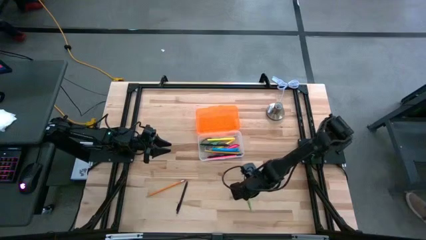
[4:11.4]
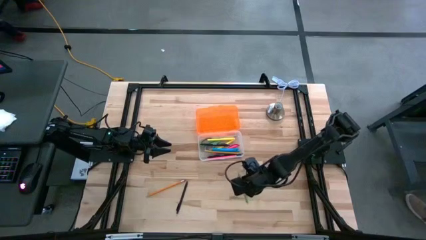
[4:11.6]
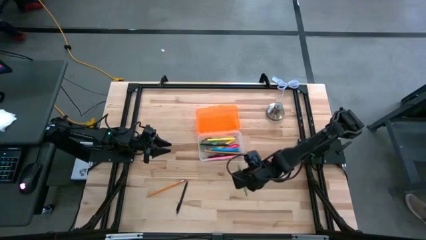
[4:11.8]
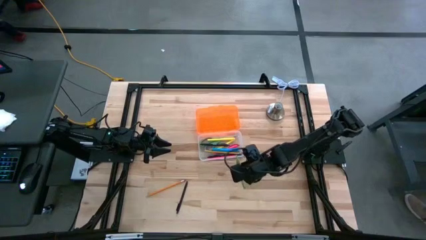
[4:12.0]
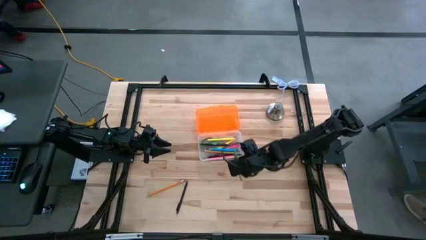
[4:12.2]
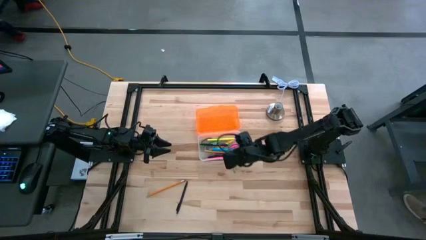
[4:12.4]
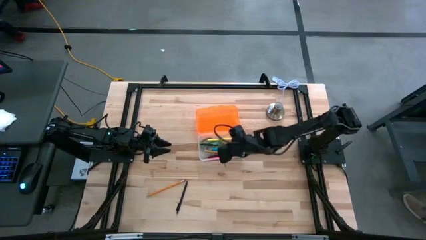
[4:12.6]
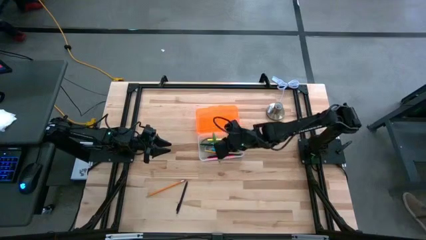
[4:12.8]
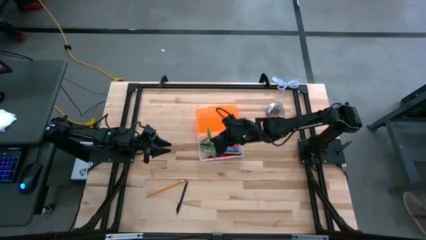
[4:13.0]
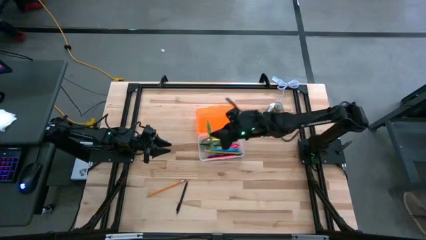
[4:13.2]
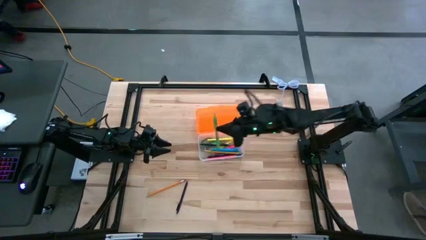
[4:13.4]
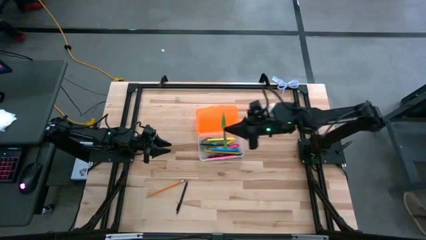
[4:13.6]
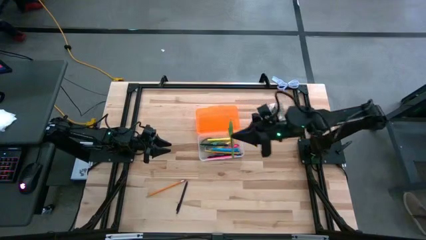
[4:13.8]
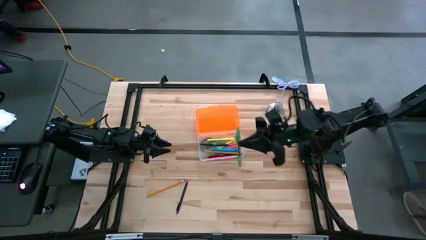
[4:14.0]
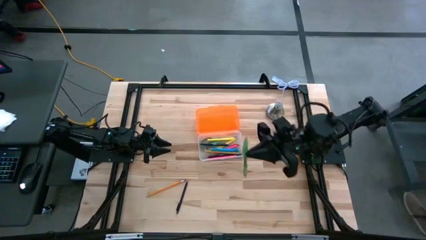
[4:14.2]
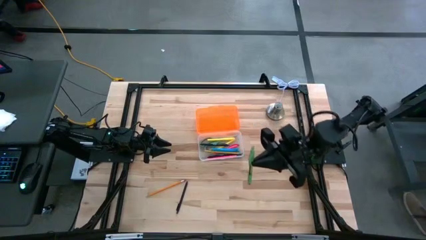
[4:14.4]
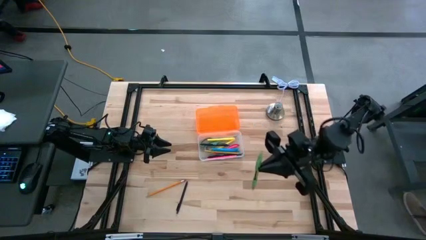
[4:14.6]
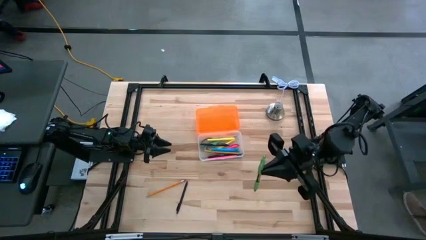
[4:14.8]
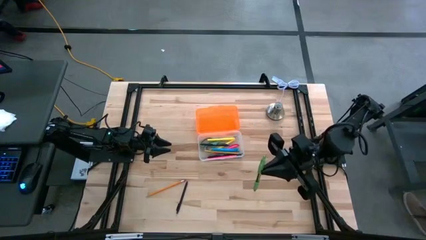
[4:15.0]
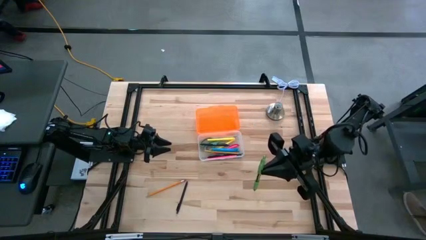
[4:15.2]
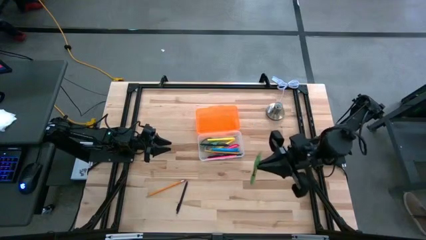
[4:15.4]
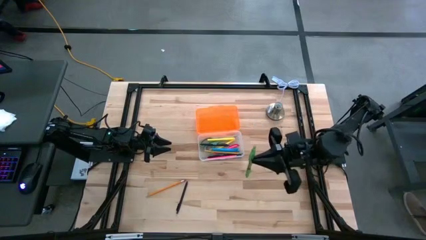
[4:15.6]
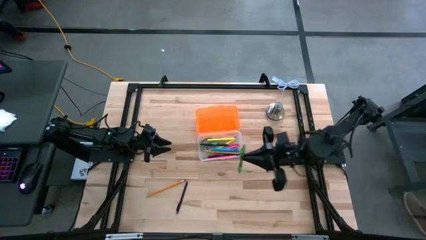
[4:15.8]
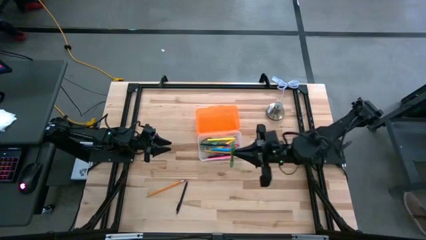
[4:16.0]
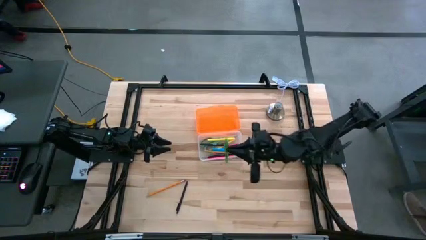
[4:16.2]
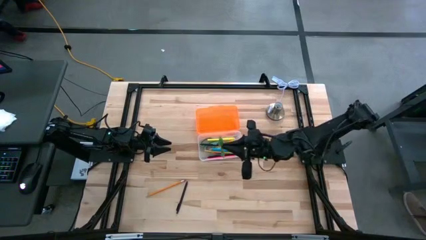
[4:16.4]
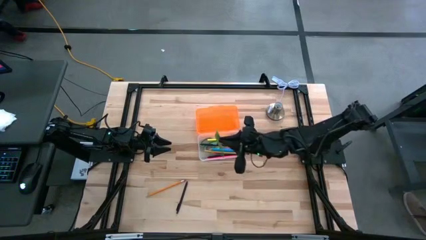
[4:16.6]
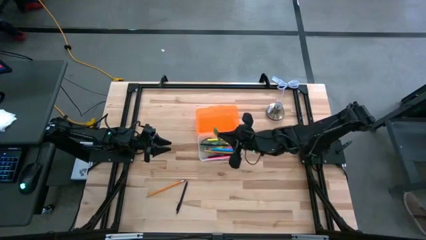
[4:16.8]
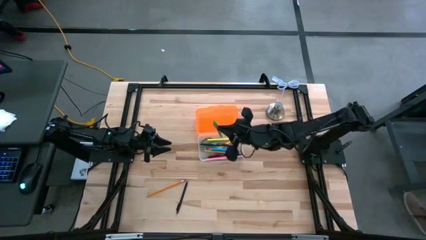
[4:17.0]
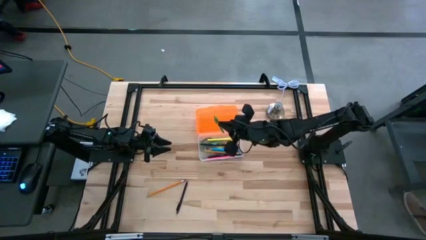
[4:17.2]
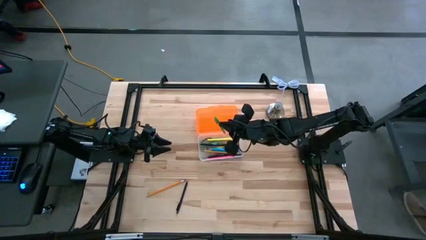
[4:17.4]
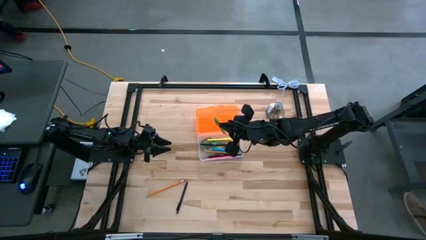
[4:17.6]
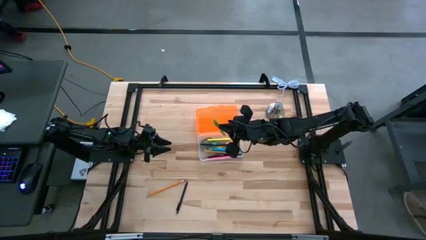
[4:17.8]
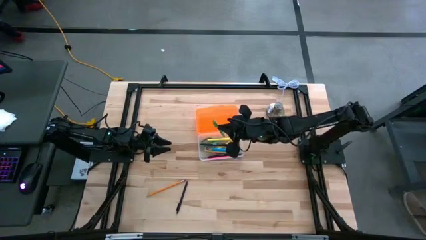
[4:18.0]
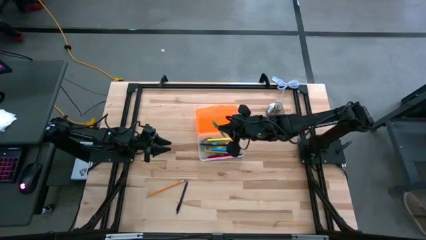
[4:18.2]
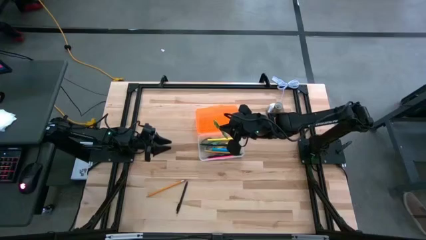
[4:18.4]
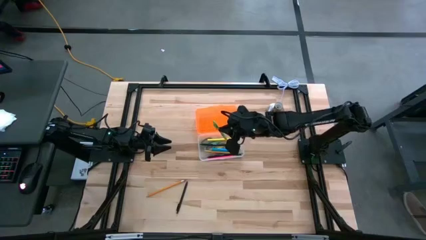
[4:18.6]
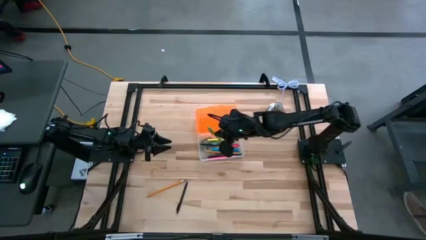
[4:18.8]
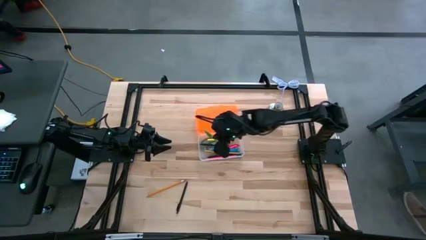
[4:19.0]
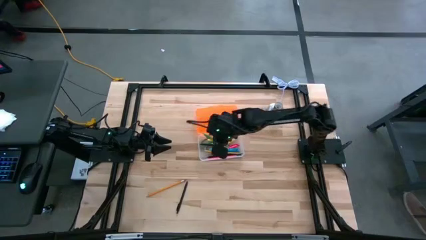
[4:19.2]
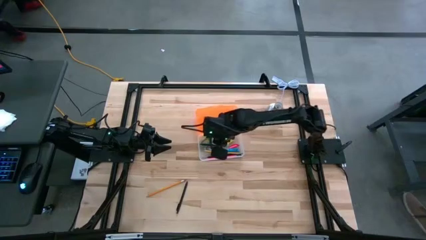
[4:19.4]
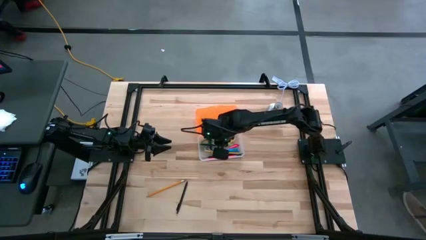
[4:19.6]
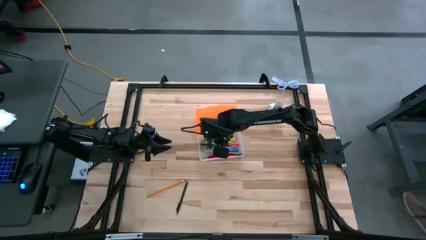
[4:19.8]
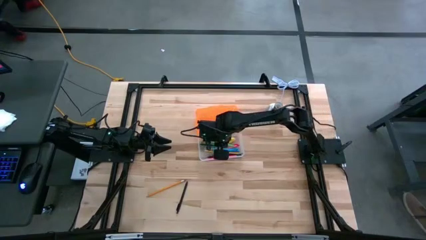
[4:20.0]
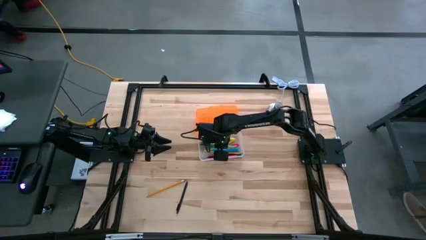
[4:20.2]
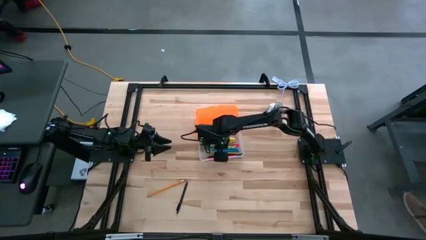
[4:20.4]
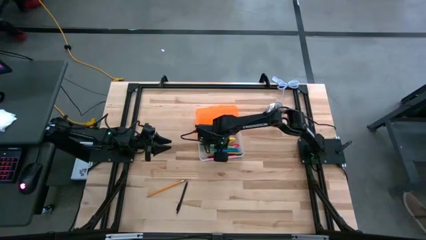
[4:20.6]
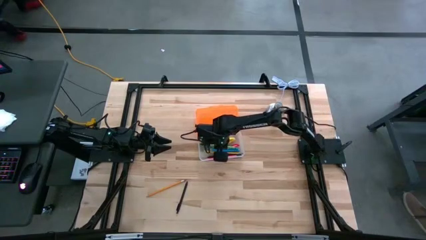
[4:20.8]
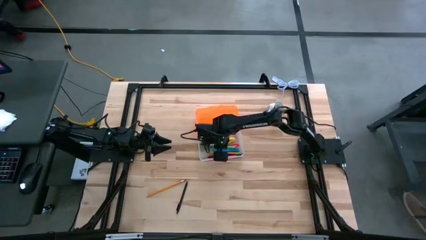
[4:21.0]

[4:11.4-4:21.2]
Task: Pick & place school supplies into a supply box
Put the green pen into the container

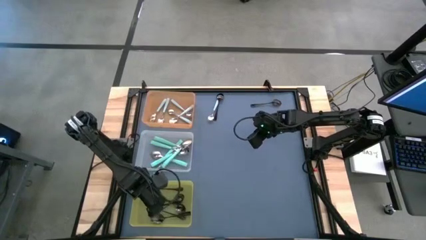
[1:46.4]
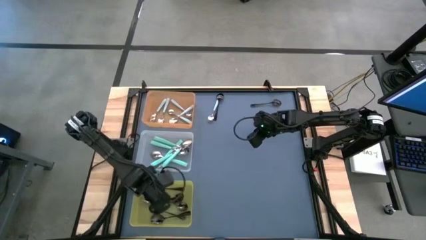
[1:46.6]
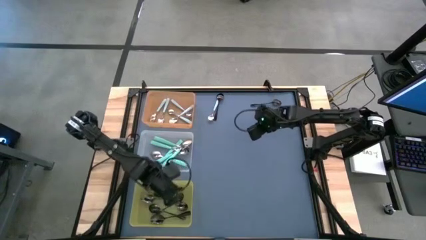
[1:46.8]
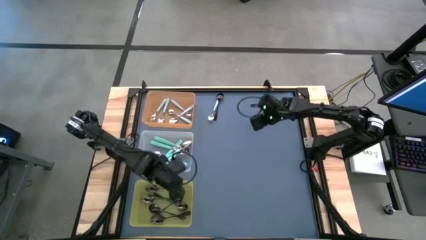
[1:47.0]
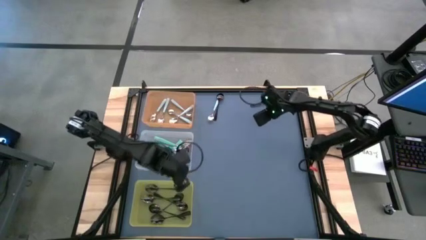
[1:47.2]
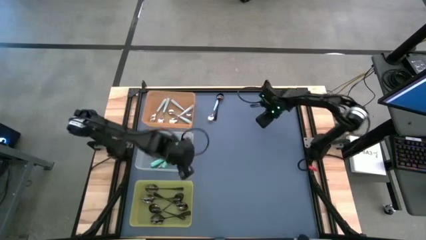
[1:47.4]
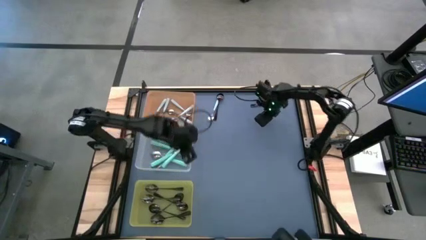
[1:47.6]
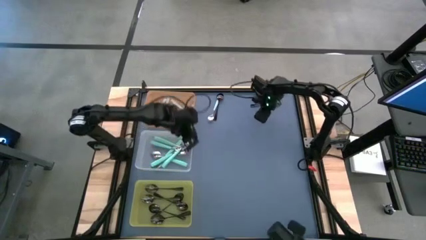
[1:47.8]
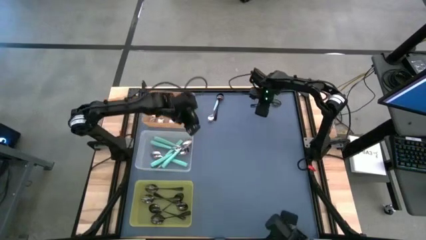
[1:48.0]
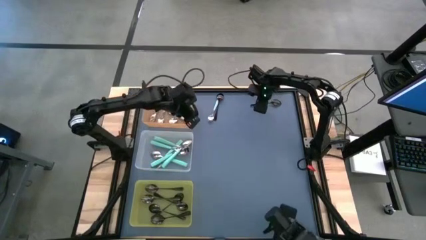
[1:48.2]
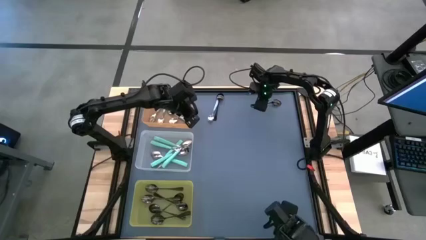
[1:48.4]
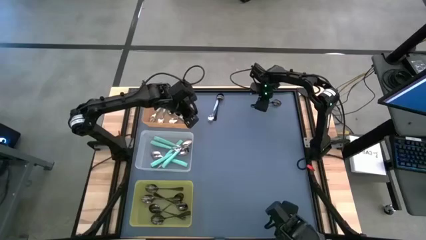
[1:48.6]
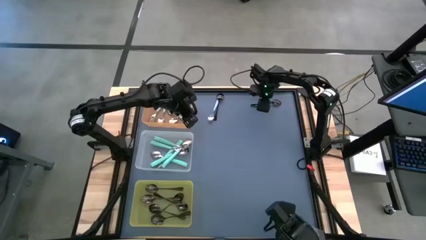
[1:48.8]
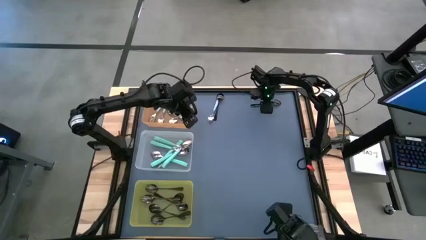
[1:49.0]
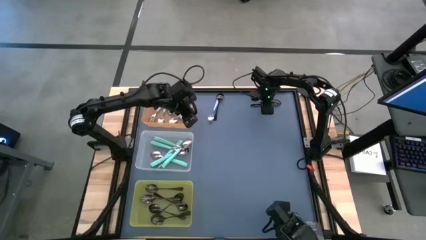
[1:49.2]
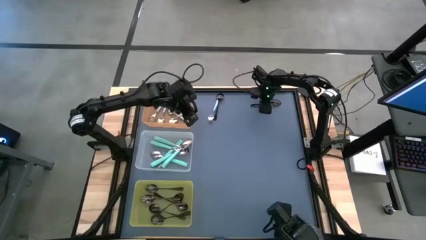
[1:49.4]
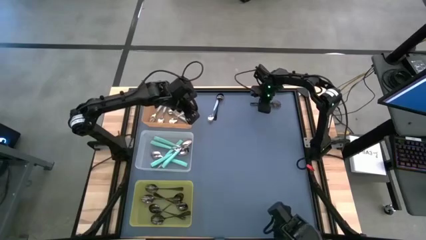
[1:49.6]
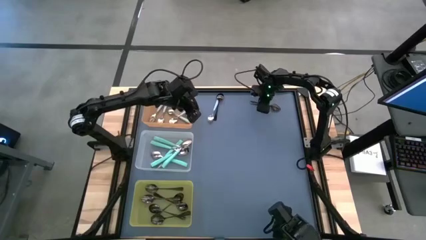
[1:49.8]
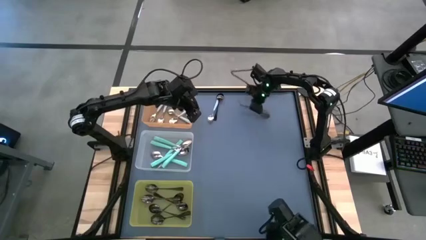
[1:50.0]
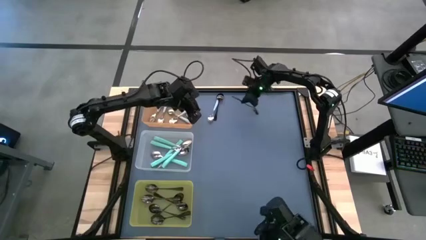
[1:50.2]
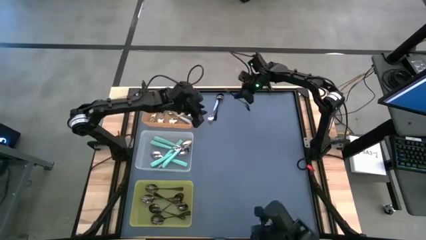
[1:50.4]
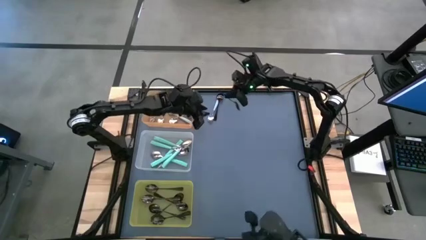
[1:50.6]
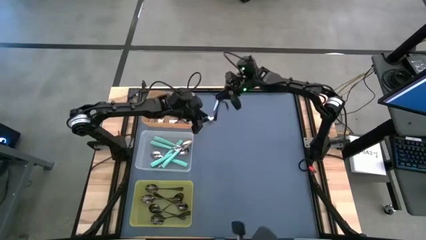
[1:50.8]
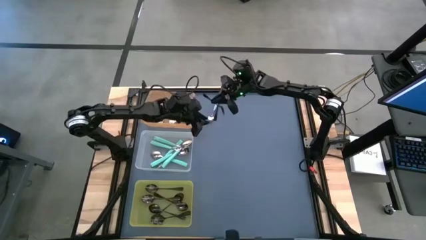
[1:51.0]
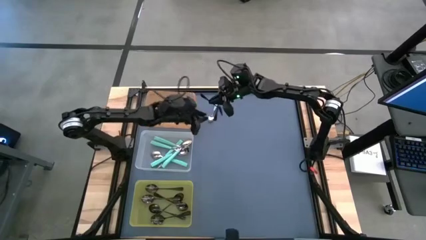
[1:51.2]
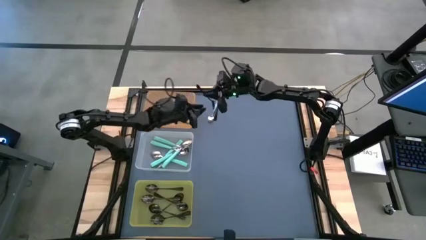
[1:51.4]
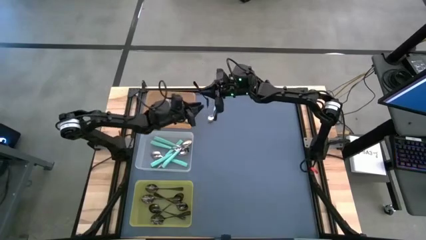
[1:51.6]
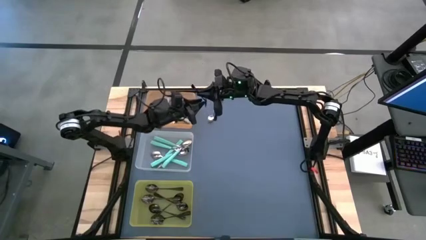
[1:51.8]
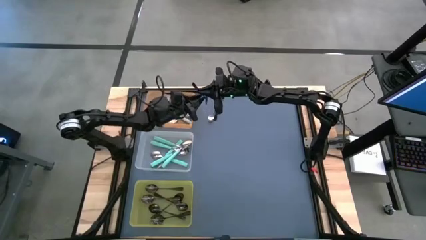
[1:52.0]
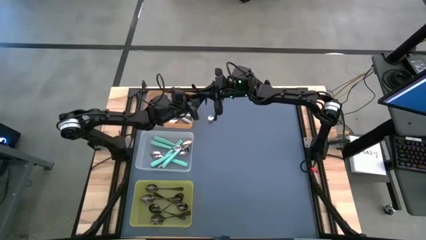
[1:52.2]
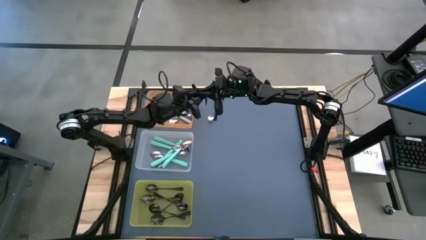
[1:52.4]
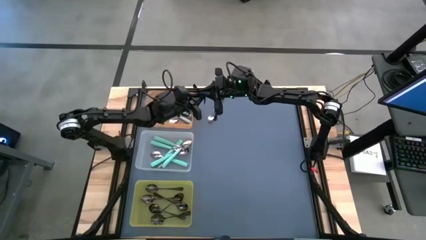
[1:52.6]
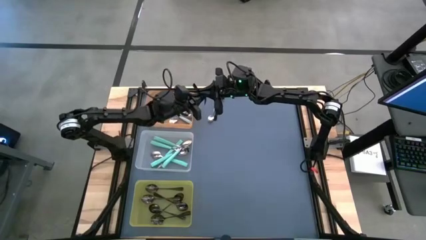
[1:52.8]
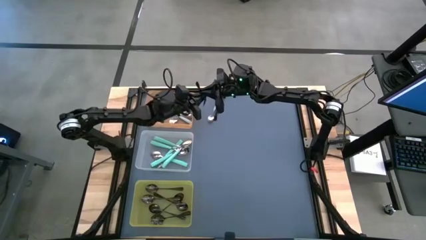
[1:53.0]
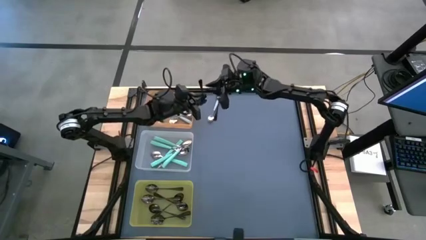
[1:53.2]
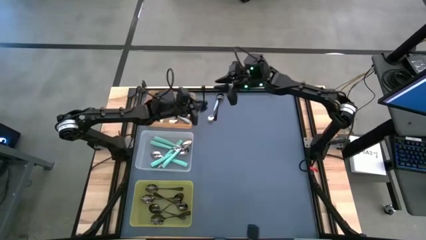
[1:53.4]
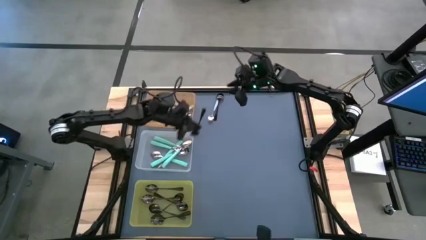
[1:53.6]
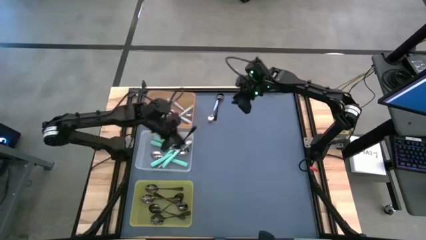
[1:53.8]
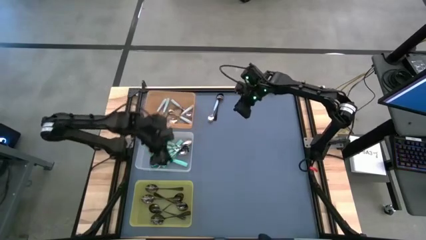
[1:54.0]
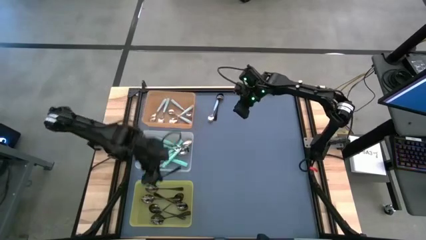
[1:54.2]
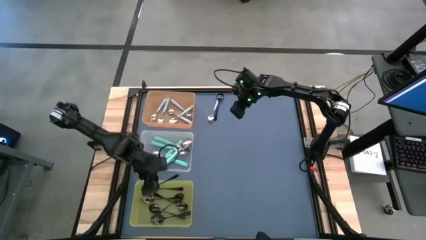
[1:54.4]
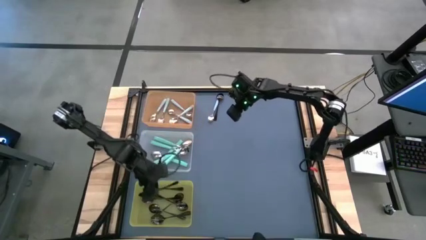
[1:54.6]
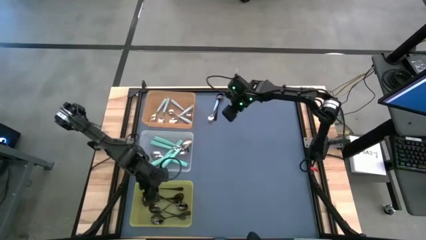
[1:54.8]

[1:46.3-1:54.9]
Task: Sort silverware by color (type)
Put the black spoon into the yellow bin
